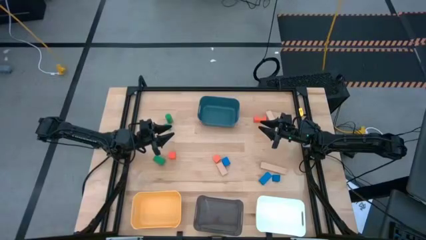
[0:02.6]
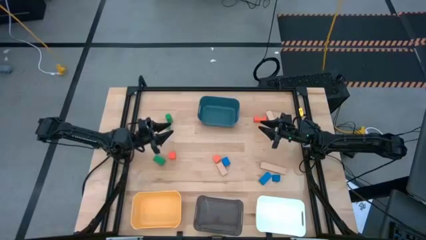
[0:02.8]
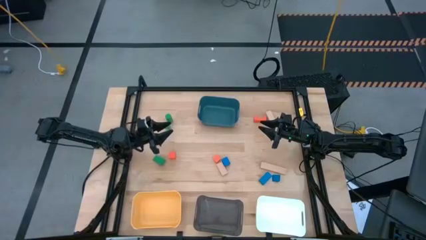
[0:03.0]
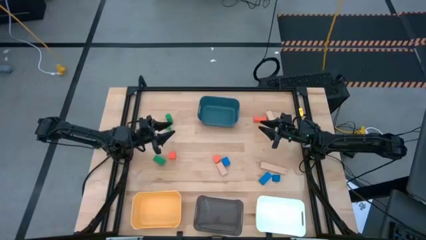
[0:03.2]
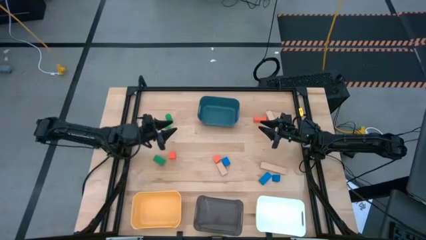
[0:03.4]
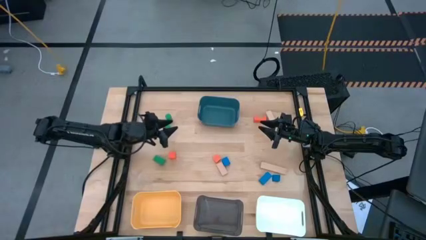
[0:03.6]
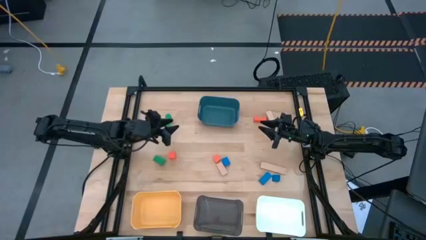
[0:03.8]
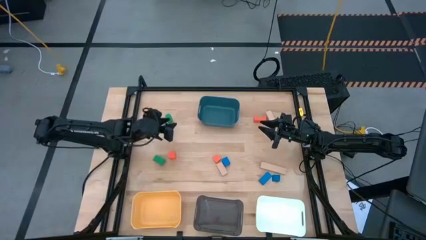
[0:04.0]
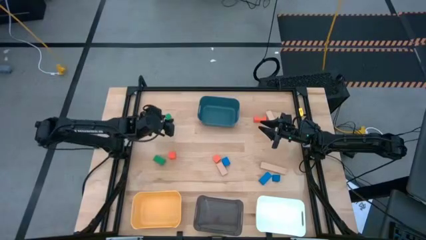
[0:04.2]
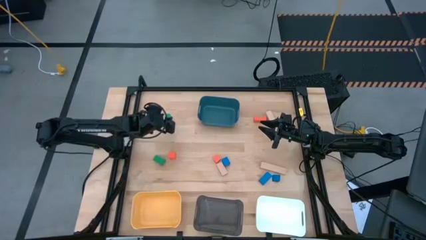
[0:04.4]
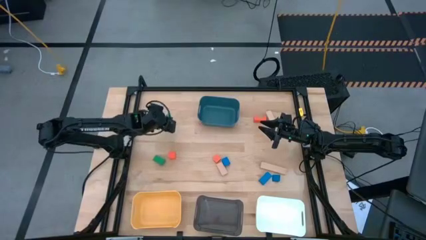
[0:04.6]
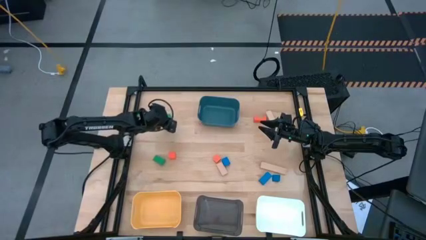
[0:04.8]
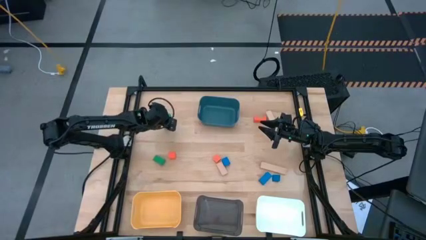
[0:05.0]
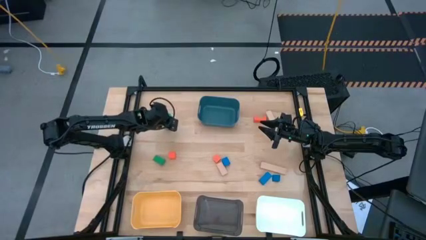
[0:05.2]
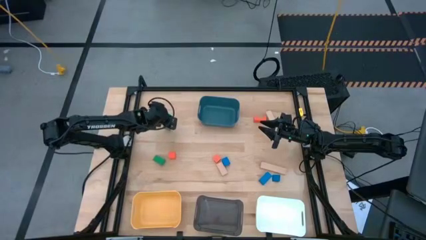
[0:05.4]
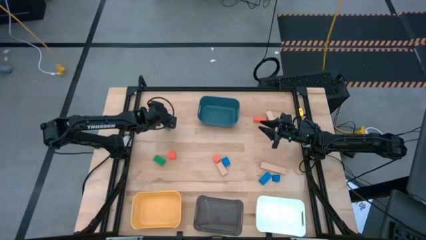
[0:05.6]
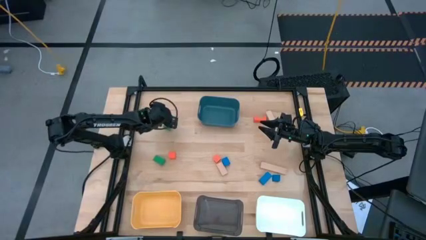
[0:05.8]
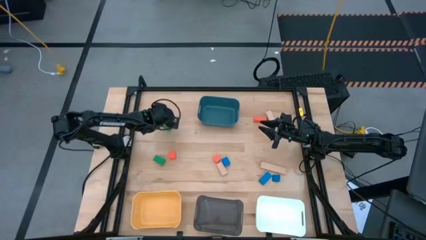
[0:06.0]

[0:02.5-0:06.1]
Task: Sort & place blocks by color
Put the top green block into the blue bin

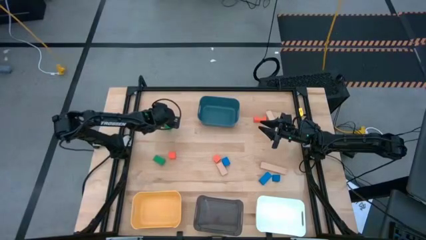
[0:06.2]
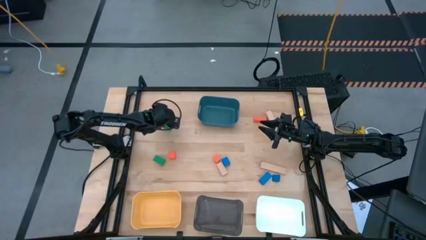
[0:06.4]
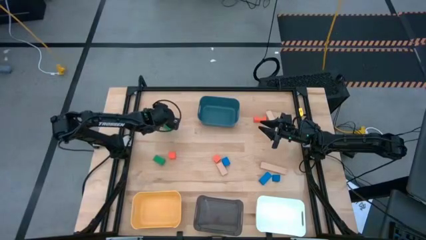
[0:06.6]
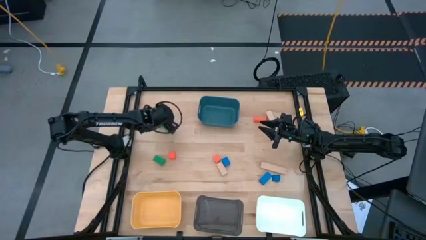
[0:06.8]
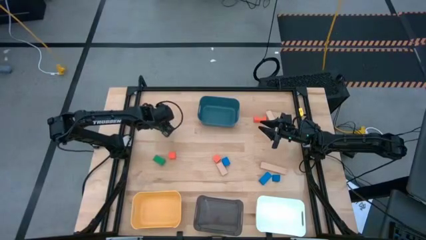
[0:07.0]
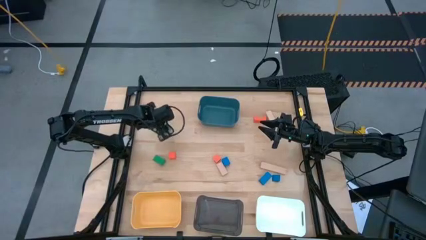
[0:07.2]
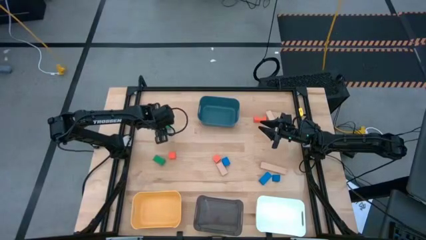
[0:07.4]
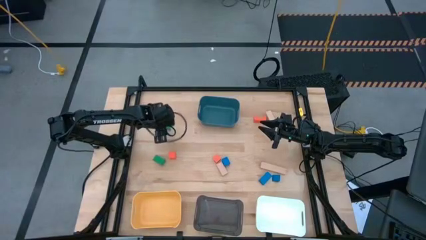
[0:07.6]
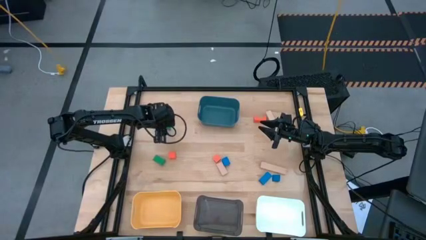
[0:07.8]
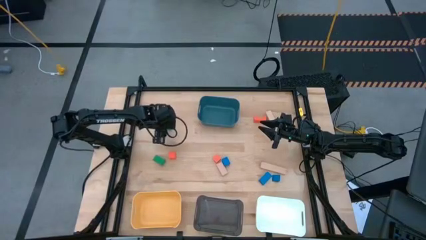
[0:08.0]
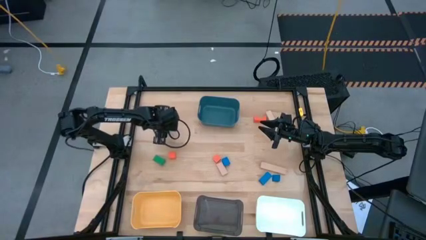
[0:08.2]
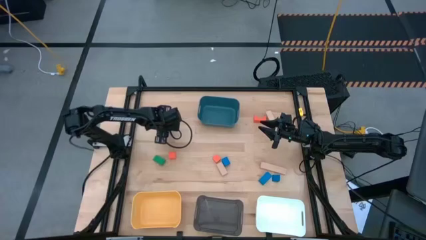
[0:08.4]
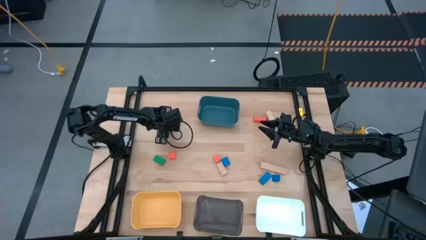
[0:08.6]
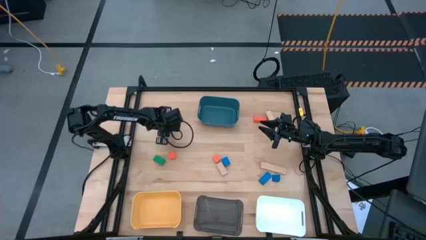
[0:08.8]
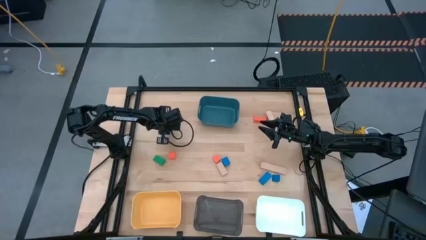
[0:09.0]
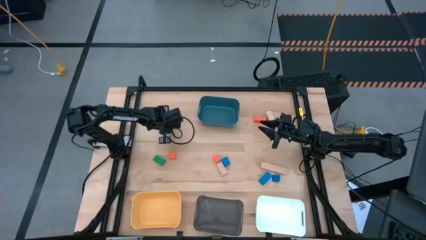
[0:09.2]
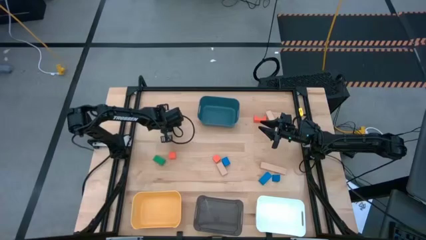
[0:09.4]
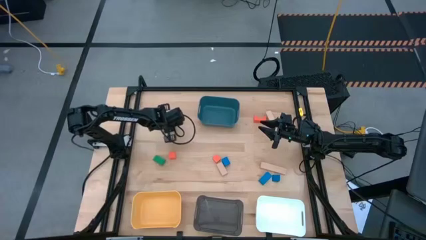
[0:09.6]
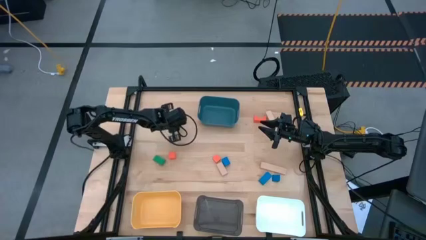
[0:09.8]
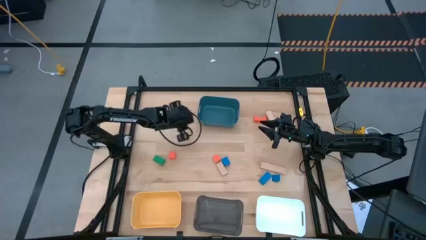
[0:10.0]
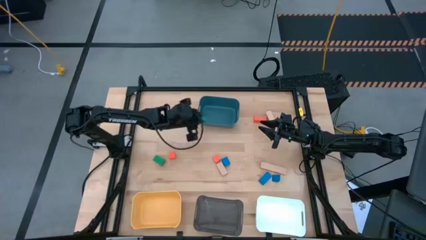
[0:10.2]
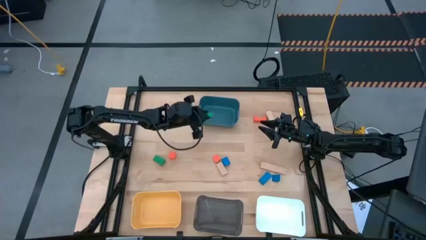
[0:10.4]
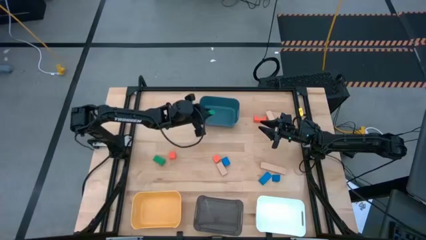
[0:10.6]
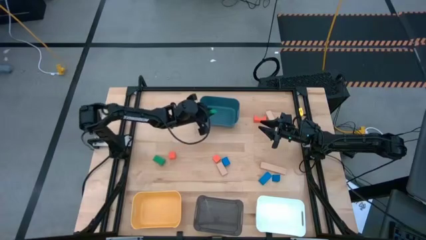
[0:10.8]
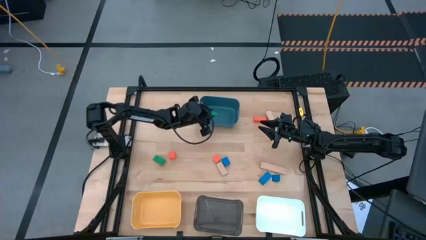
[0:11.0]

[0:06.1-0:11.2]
Put the middle green block into the blue bin

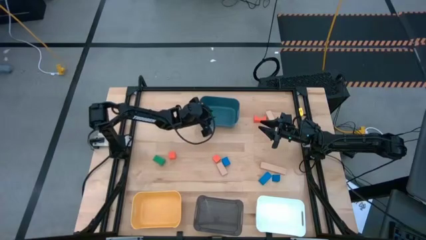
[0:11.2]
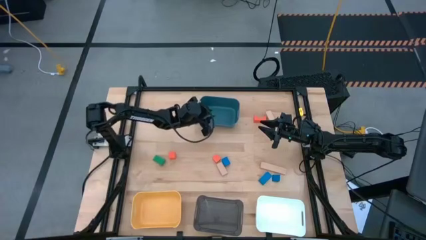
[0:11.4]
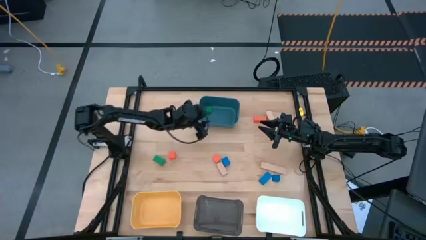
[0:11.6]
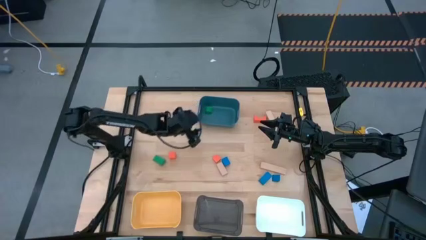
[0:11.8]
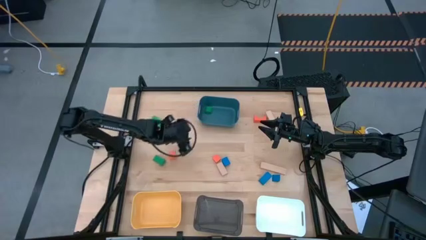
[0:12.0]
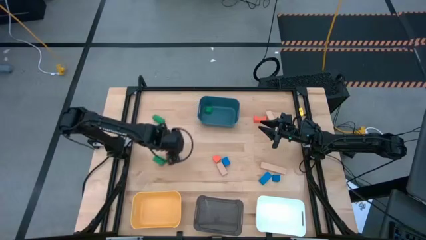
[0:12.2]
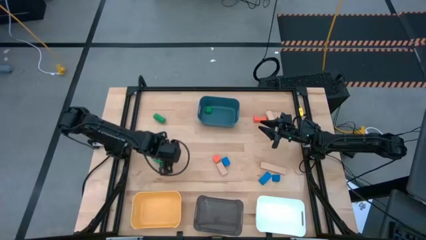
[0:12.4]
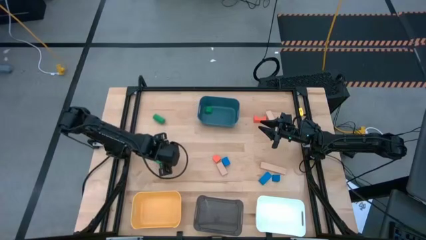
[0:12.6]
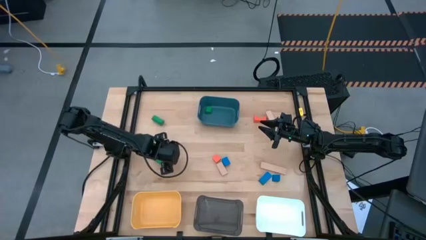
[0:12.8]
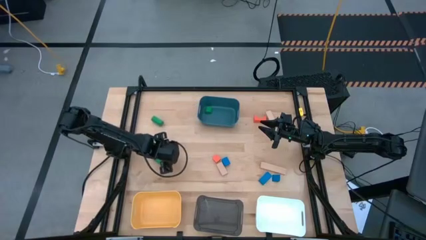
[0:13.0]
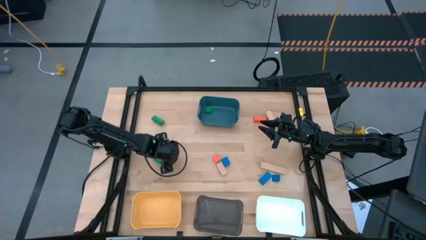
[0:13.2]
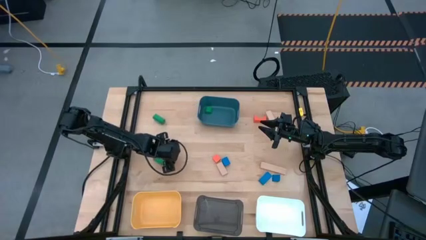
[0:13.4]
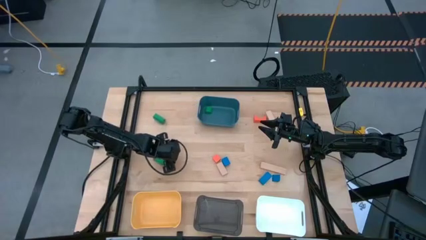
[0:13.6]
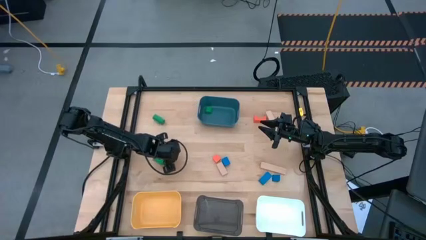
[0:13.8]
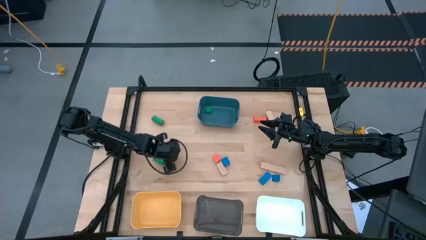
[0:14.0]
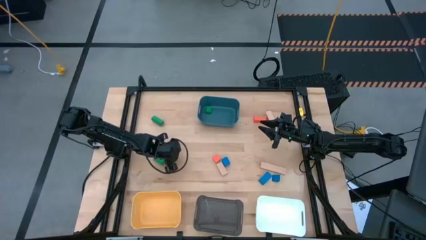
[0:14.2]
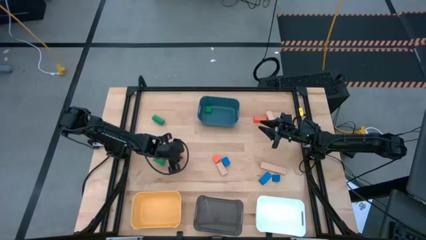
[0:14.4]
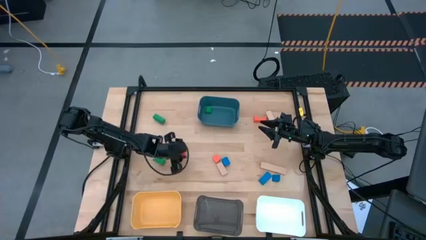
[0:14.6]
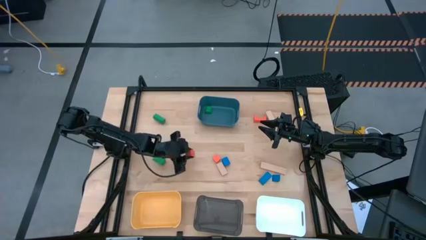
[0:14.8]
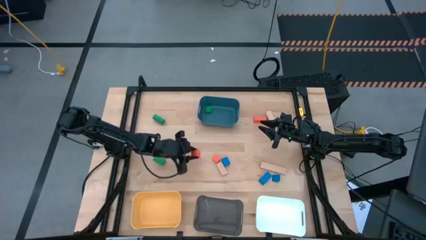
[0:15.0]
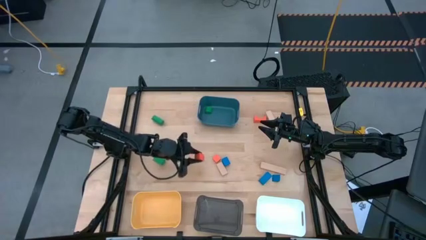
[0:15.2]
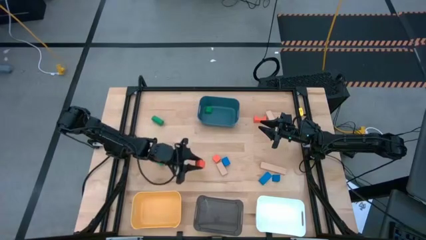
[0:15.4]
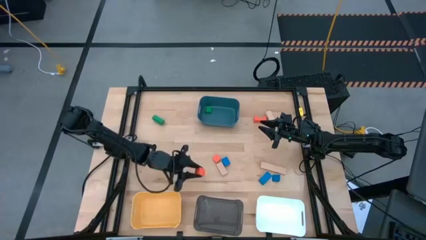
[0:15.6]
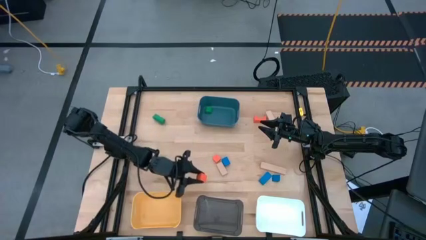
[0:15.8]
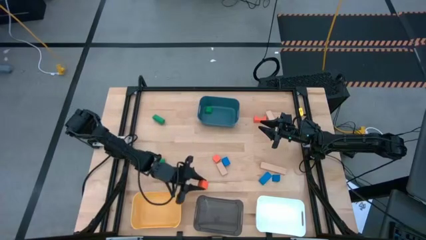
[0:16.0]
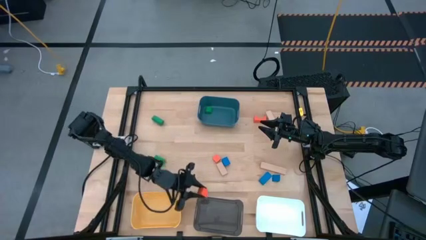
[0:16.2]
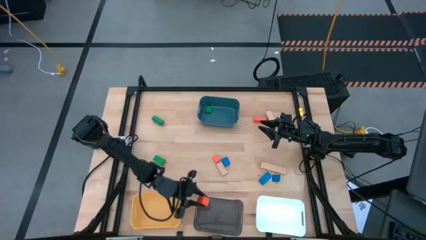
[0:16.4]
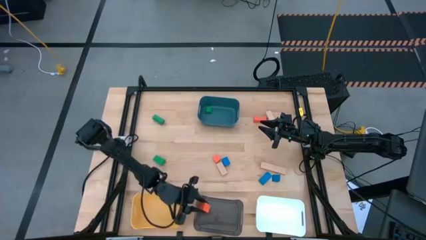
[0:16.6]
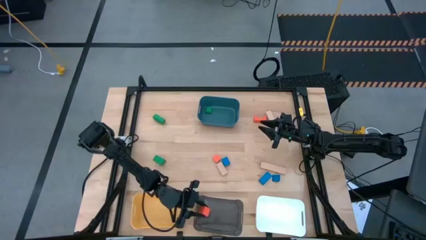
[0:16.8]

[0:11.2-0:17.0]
Put the bottom left orange block into the black bin

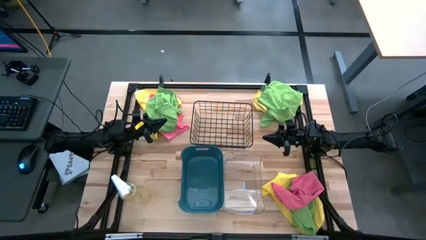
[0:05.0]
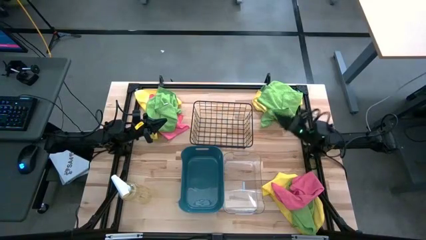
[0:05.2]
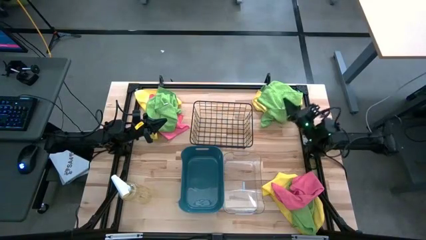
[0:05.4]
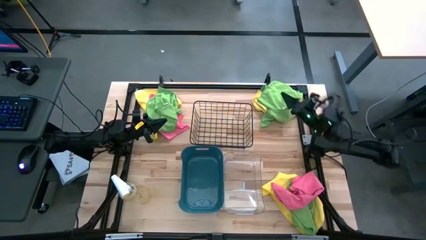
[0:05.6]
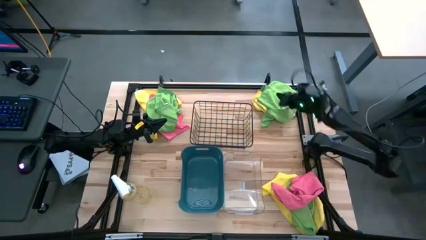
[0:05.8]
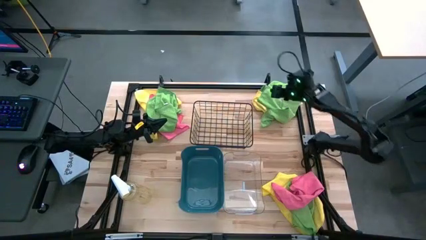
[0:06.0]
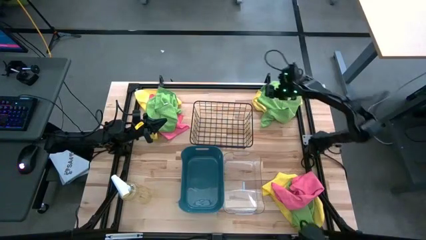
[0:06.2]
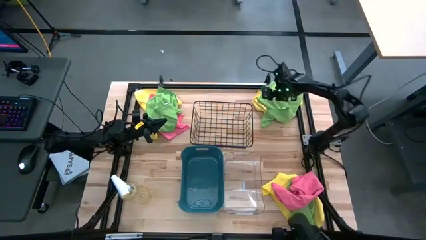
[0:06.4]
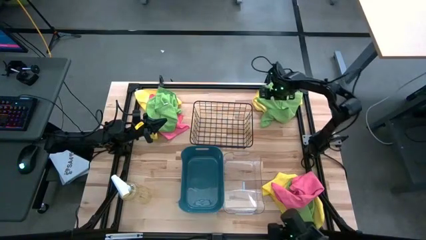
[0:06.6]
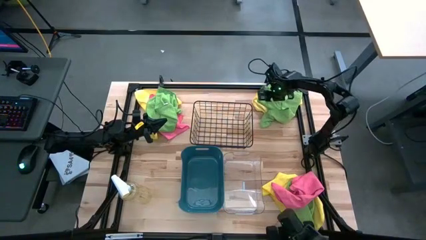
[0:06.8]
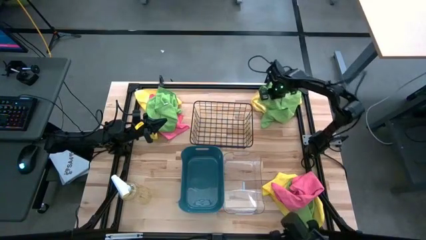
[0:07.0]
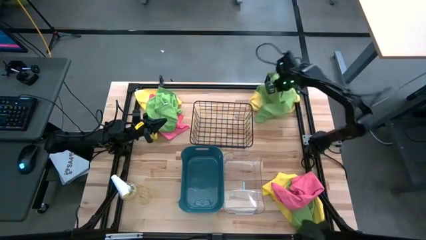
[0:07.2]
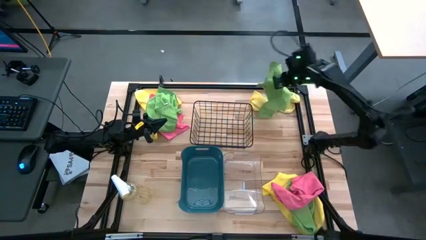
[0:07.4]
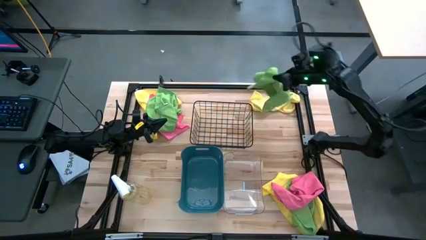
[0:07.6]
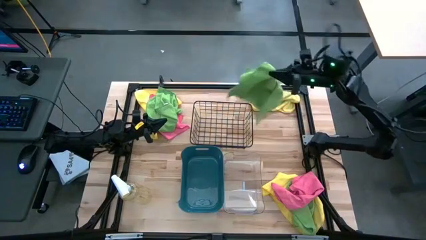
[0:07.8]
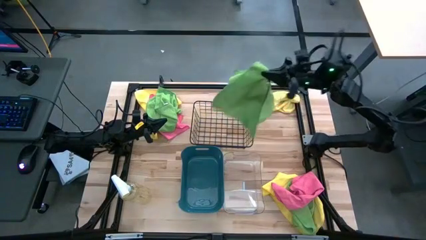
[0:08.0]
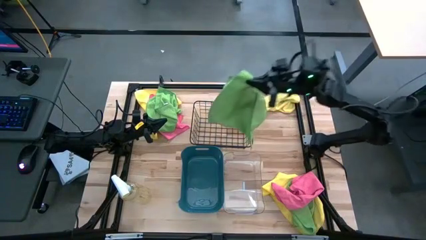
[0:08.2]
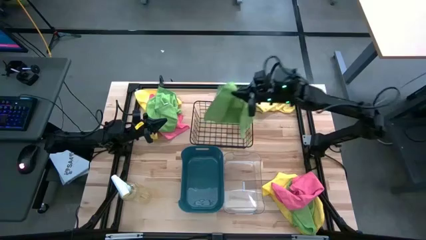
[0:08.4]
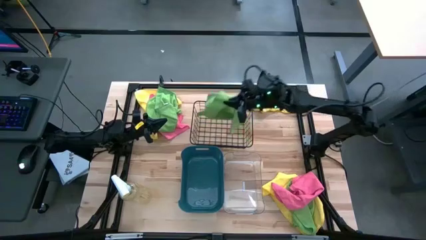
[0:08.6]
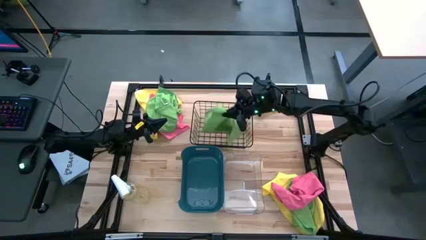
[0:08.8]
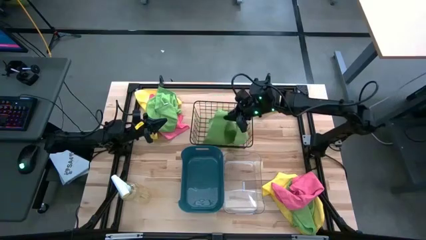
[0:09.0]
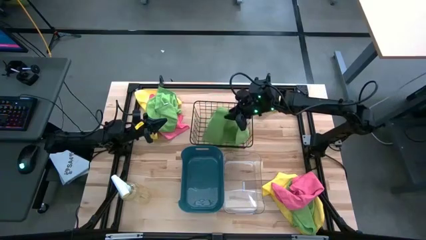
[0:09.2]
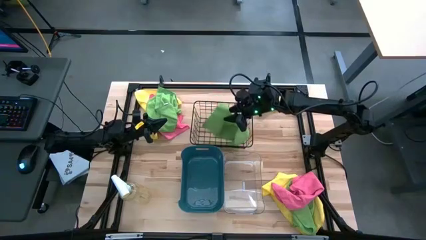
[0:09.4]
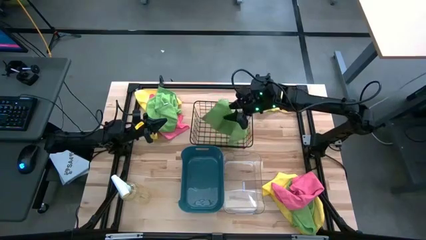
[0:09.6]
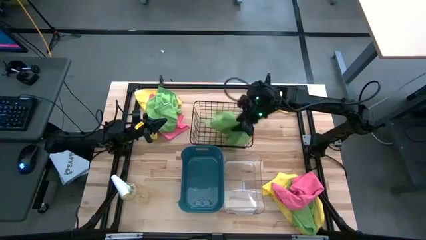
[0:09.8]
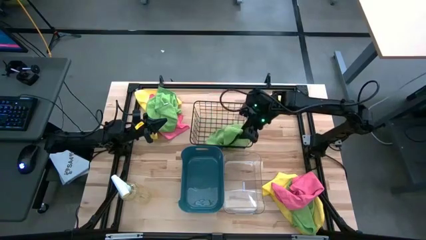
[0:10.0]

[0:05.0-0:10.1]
Task: Sort microfiber towel by color & place in baskets
Put the top right green microfiber cloth into the wire basket
